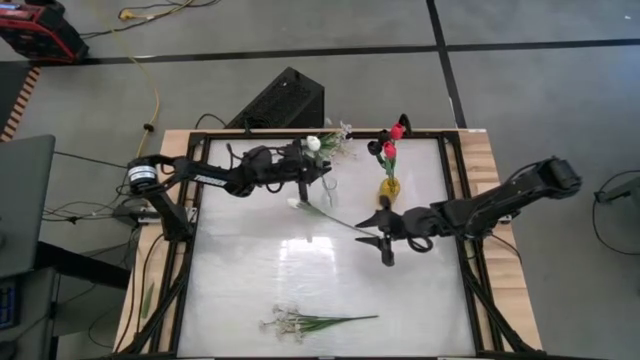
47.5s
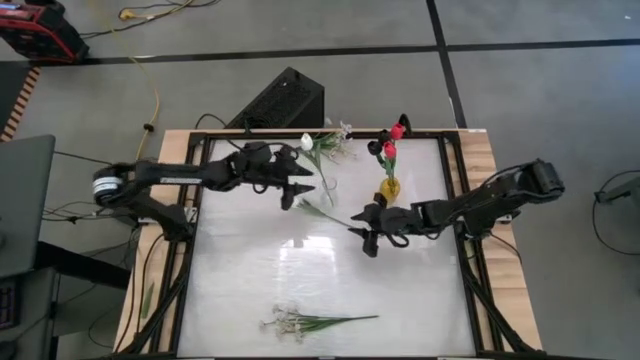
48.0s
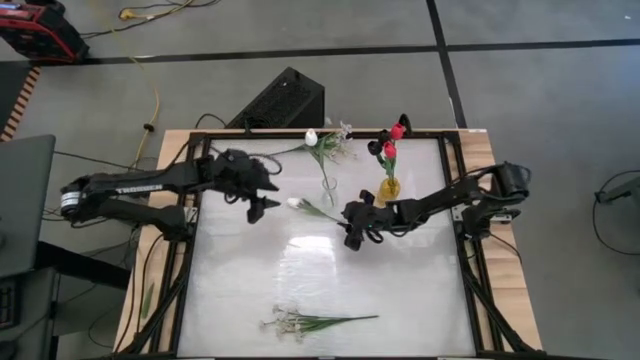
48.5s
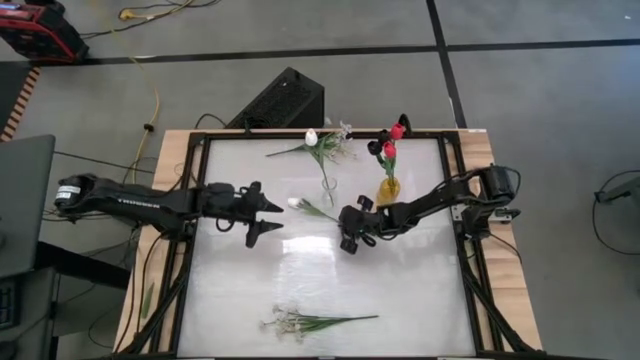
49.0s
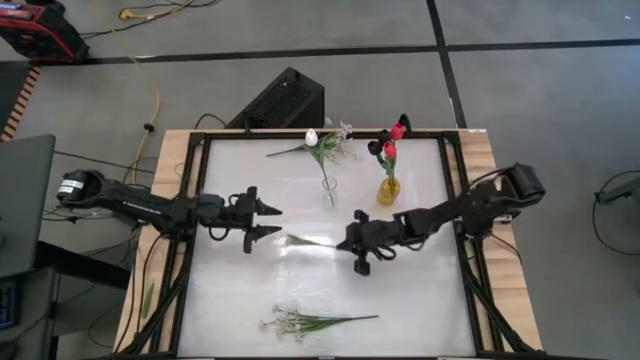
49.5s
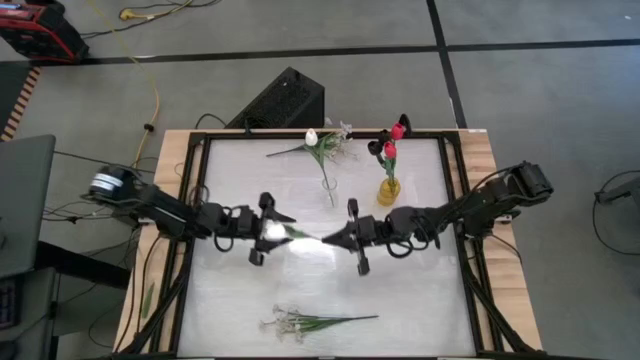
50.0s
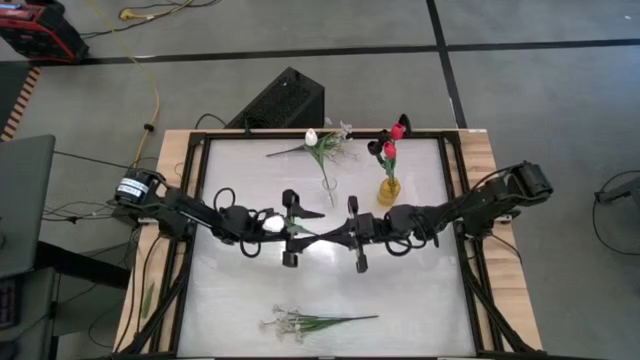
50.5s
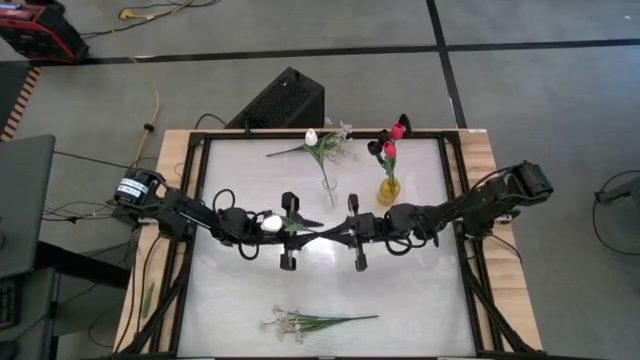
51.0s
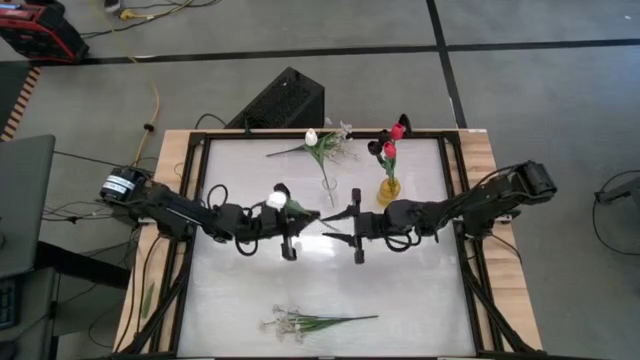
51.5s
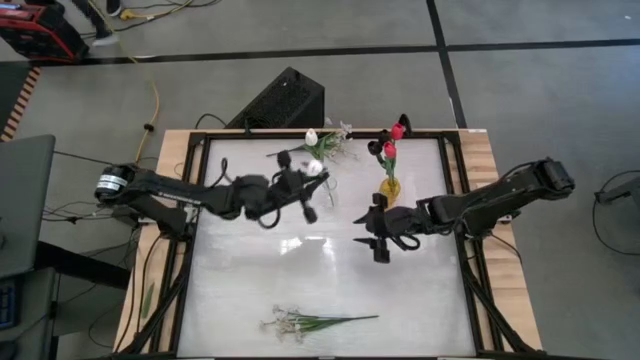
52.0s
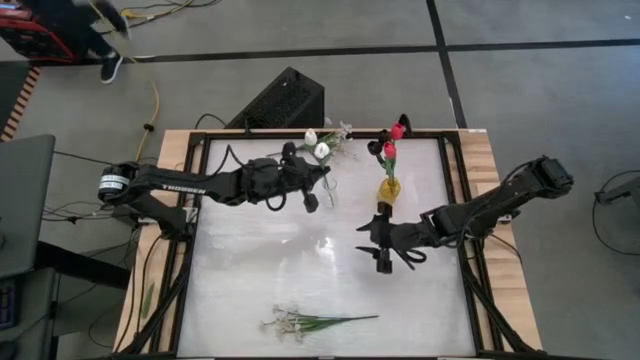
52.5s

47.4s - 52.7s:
Task: Sort flowers into vase by color
Put the white flower into the transparent vase

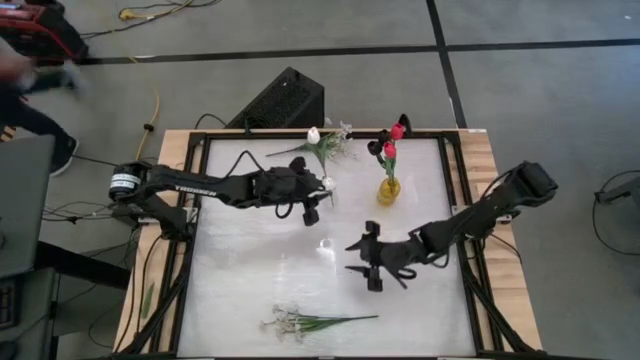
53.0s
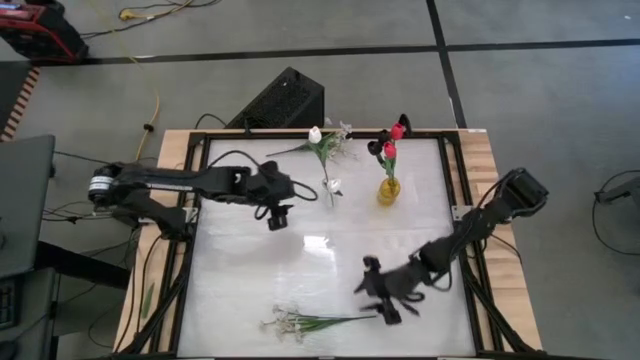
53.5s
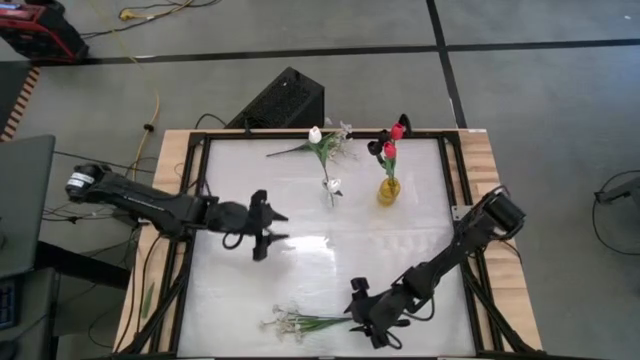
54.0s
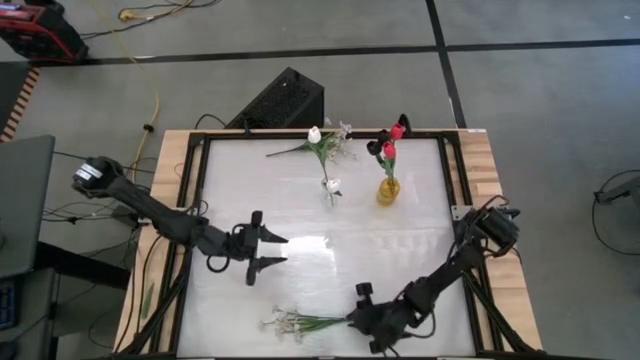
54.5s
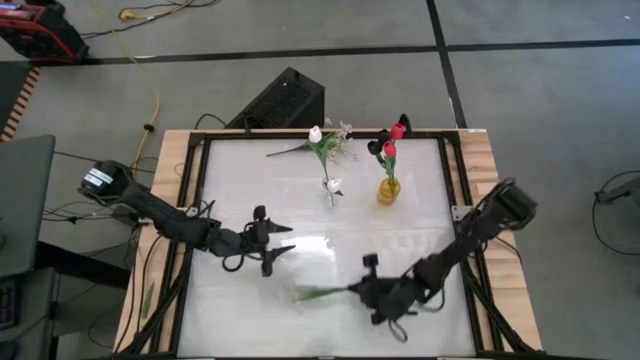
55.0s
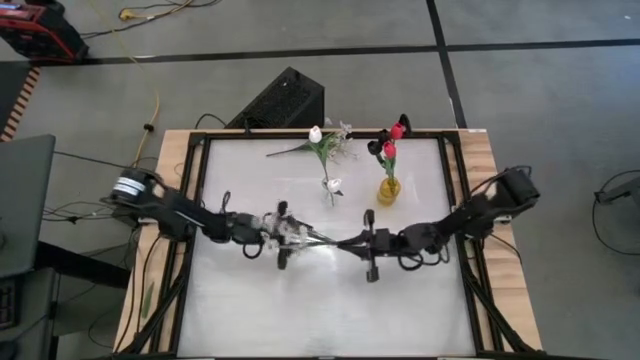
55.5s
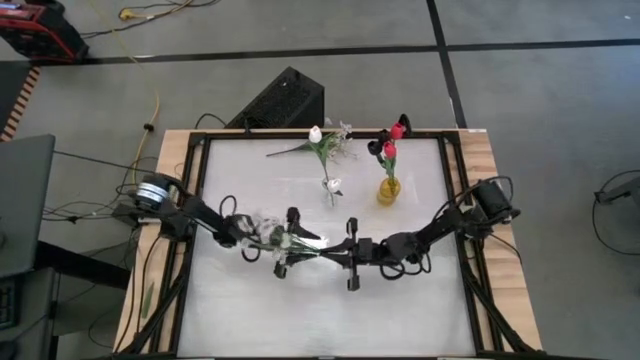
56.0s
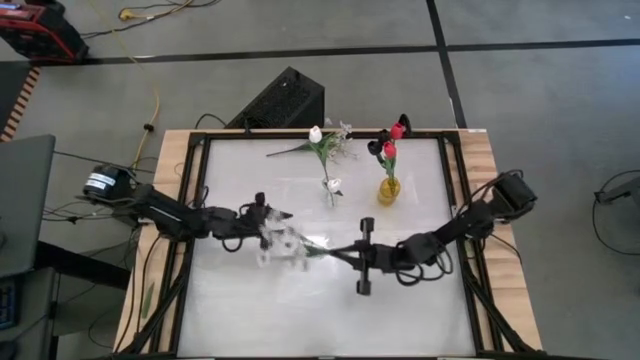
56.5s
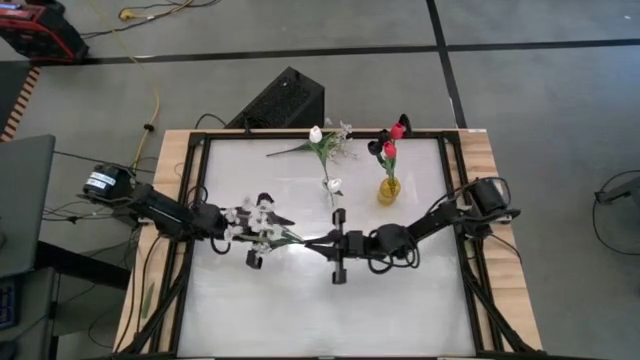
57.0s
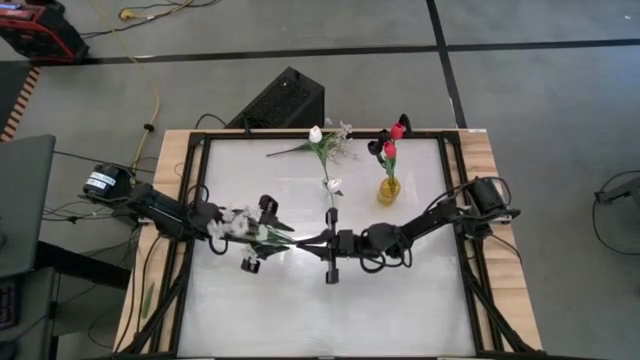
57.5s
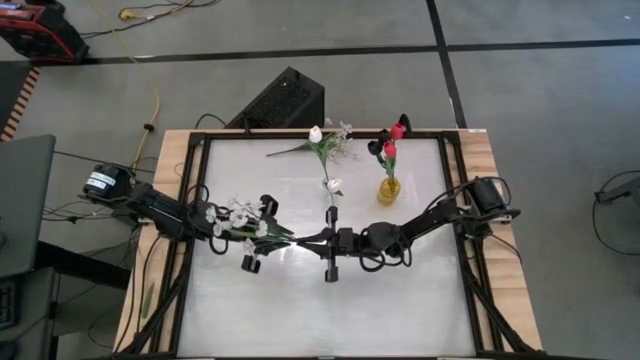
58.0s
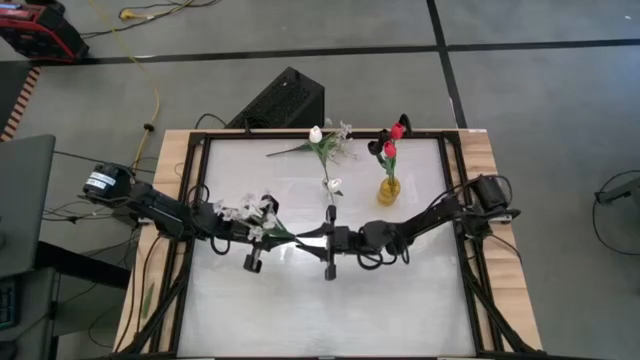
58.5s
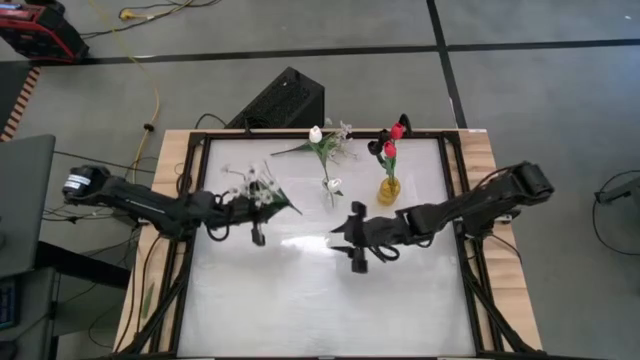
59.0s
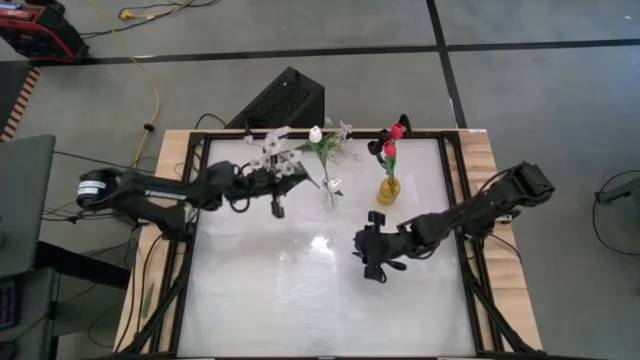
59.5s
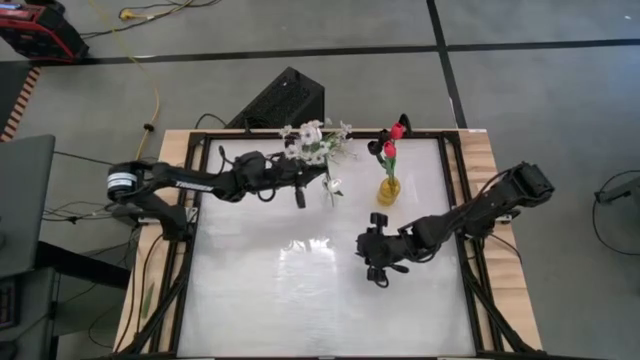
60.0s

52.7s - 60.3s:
Put the bottom white flower into the transparent vase

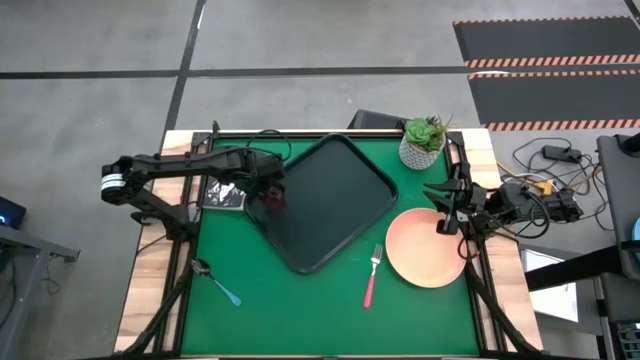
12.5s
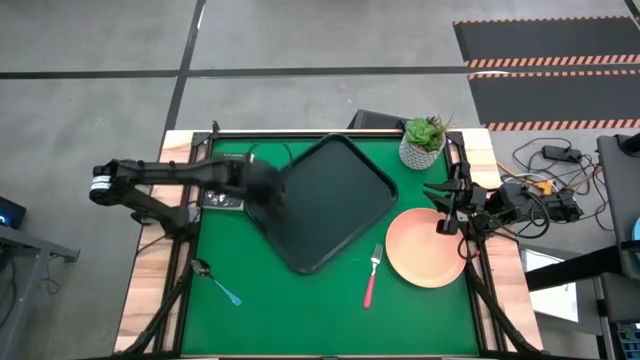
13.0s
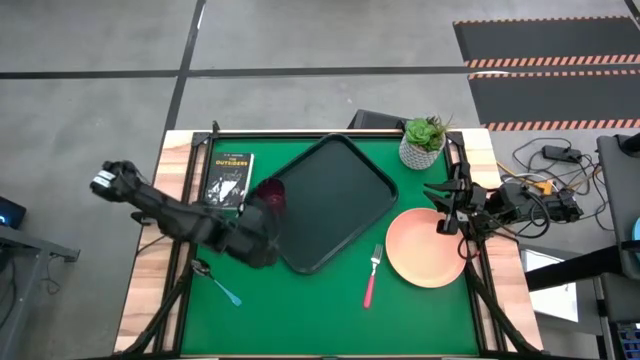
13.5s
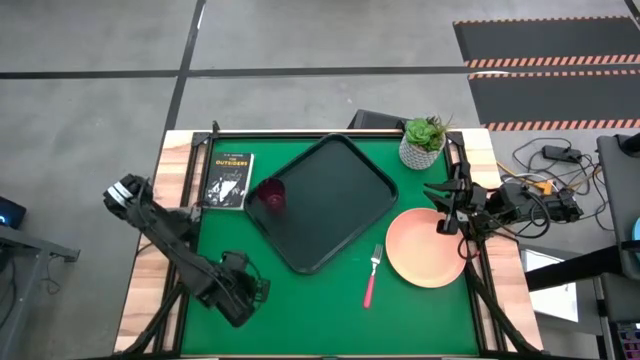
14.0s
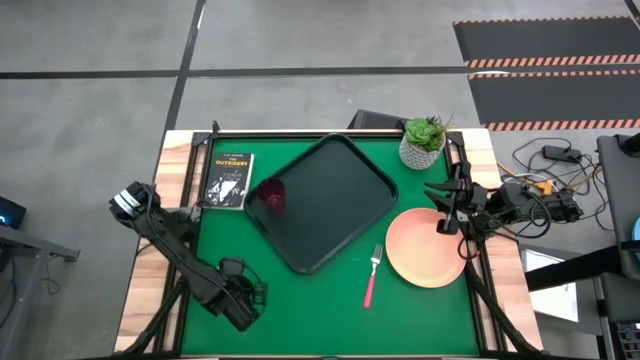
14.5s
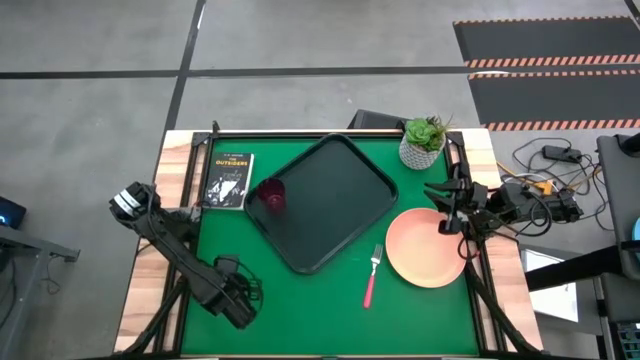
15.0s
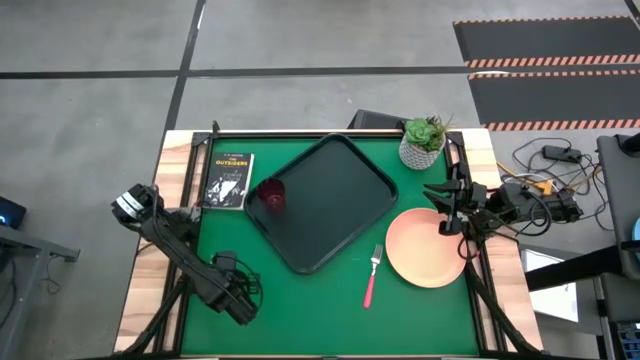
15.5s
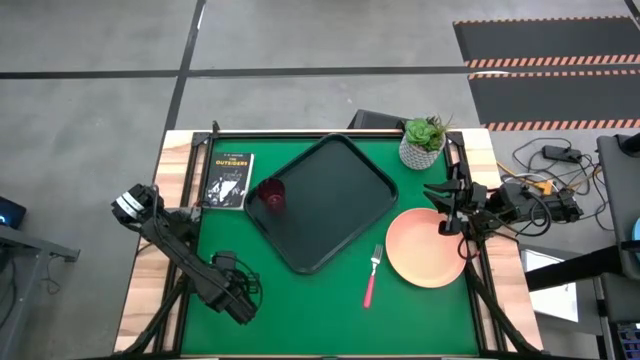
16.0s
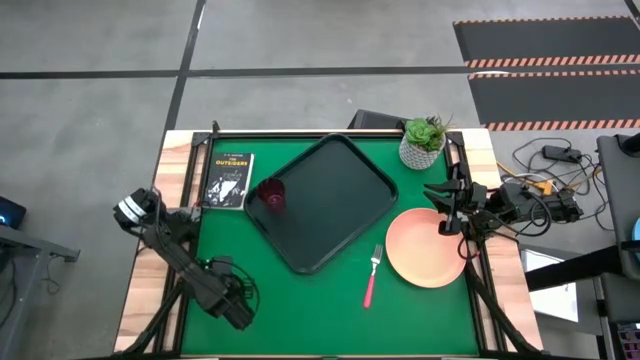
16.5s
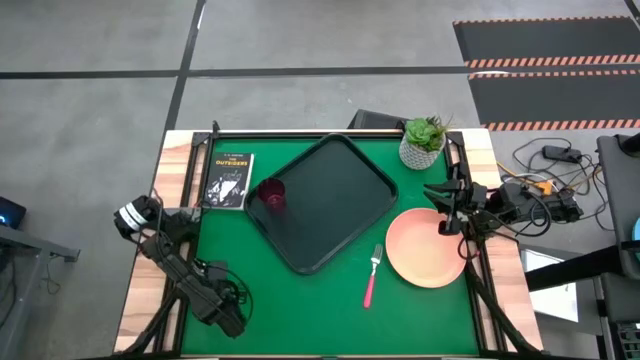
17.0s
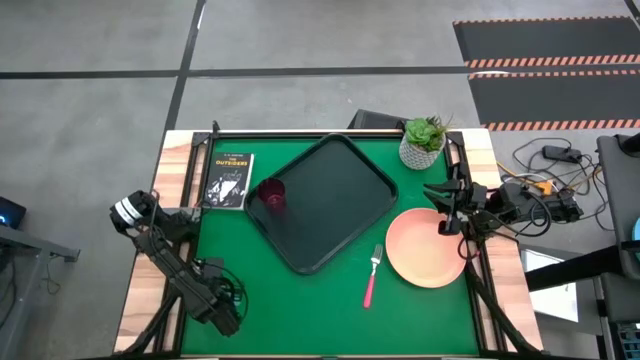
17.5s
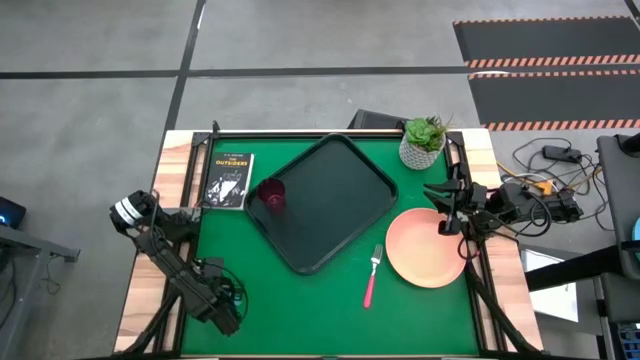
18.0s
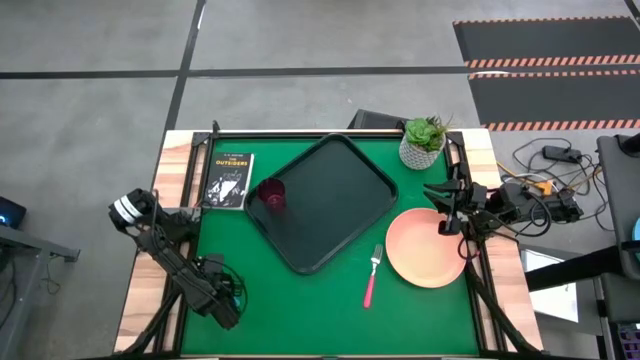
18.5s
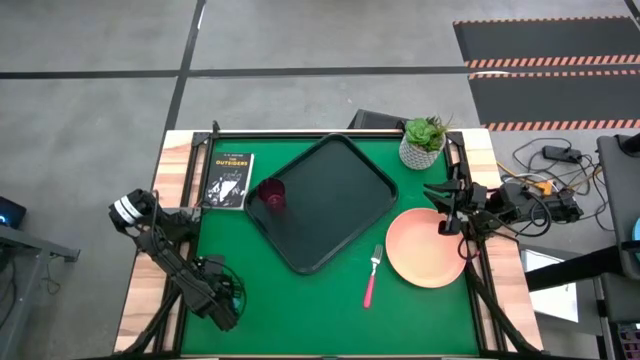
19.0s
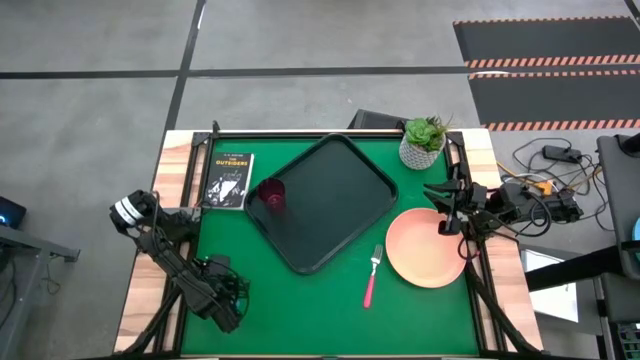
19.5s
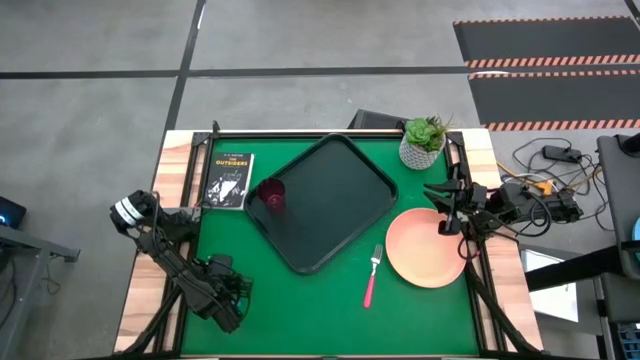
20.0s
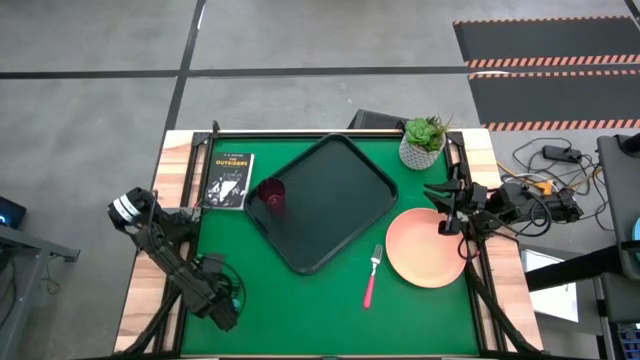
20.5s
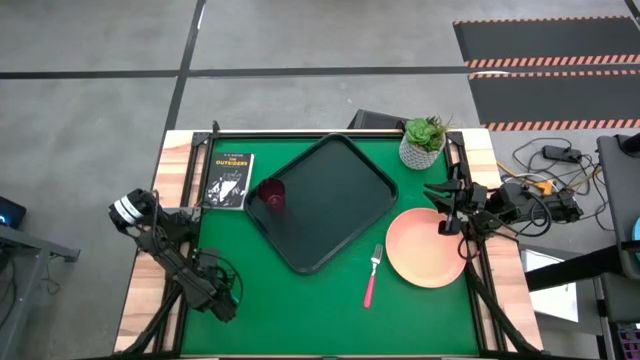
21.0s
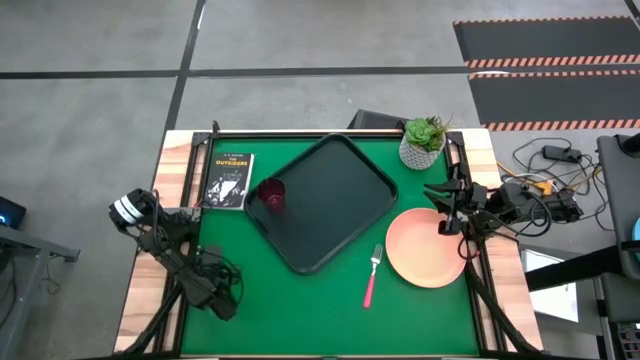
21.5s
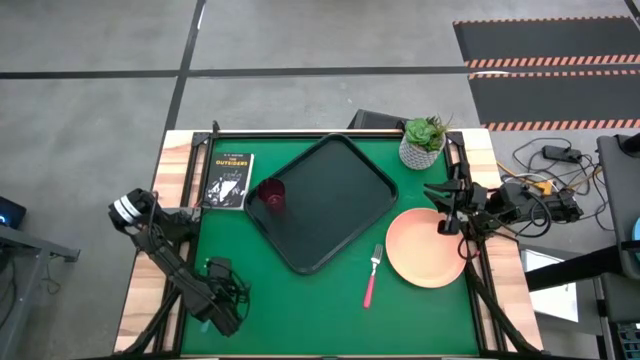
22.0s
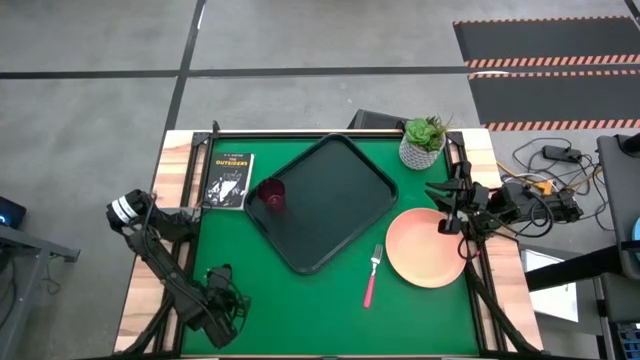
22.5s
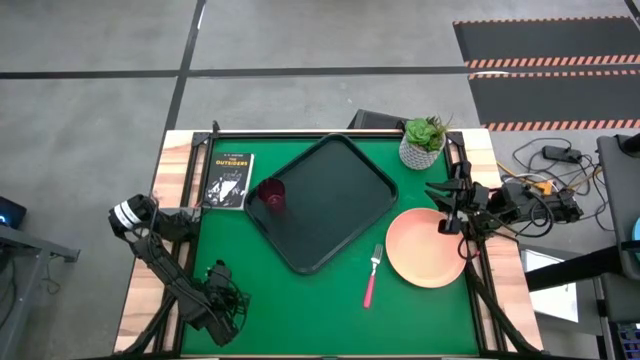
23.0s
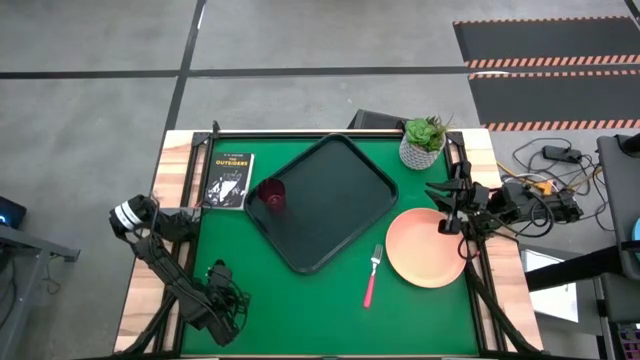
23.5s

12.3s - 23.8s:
Task: Pick and place plate/cup/fork/spoon on tray
Put the blue spoon on the black serving tray to the bottom right of the red glass
